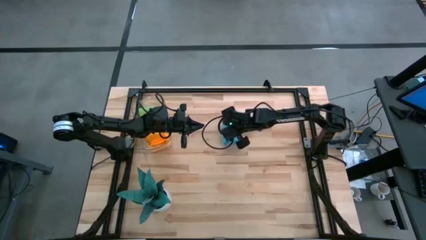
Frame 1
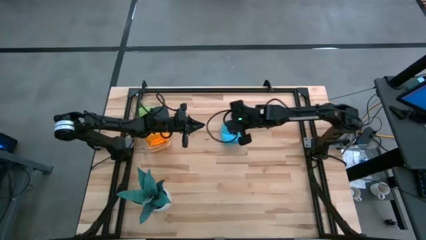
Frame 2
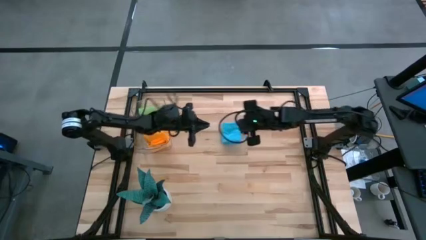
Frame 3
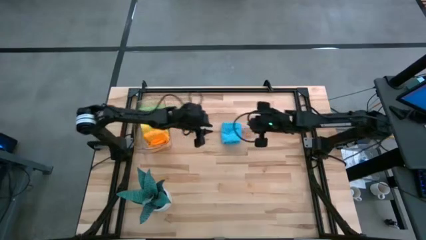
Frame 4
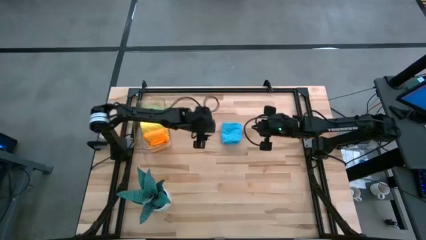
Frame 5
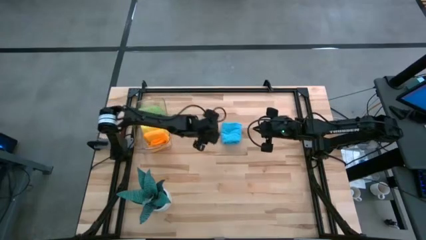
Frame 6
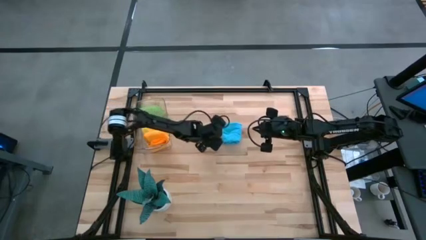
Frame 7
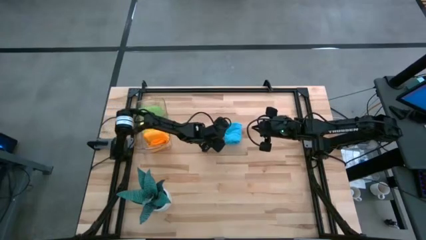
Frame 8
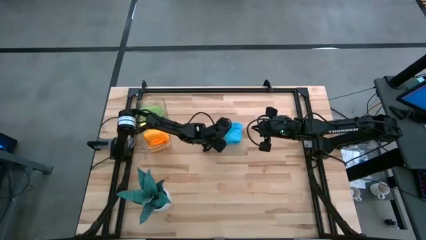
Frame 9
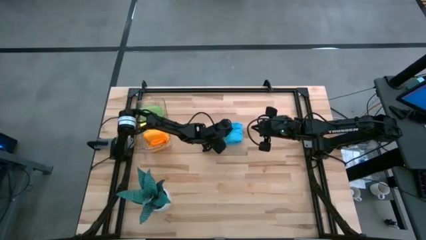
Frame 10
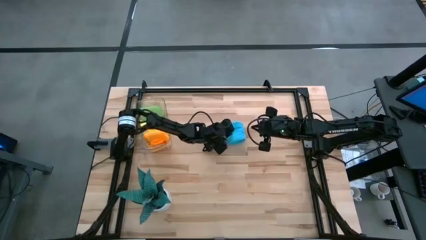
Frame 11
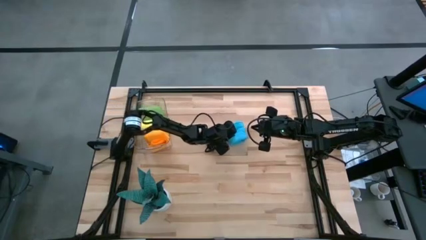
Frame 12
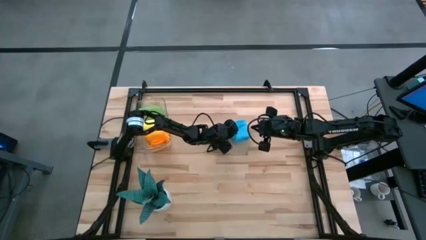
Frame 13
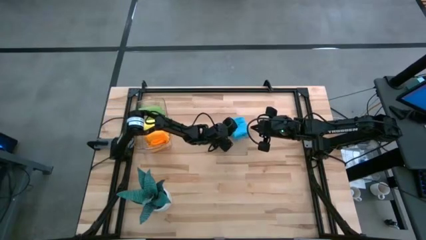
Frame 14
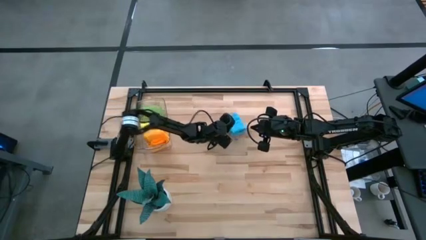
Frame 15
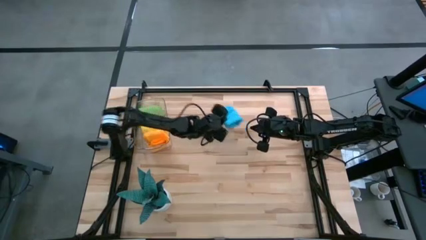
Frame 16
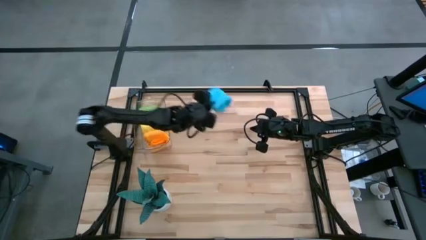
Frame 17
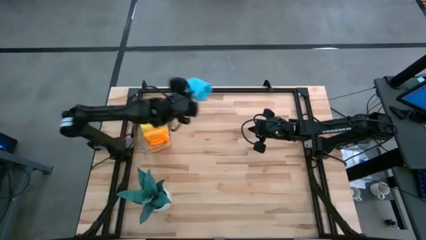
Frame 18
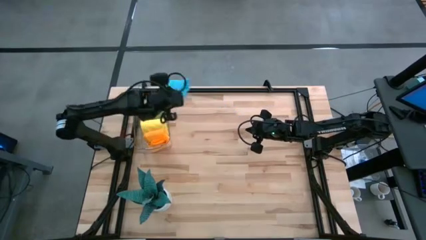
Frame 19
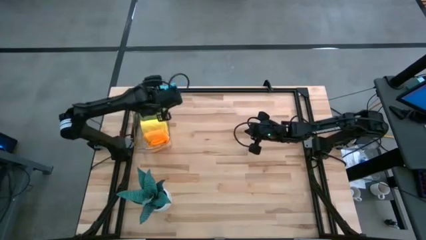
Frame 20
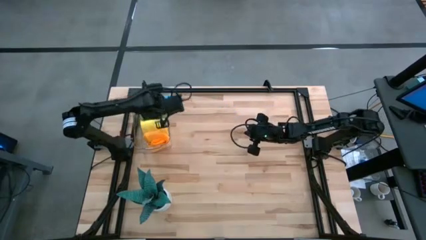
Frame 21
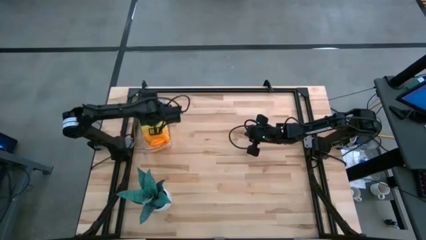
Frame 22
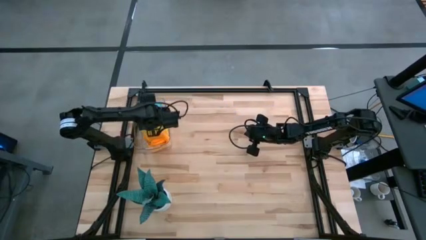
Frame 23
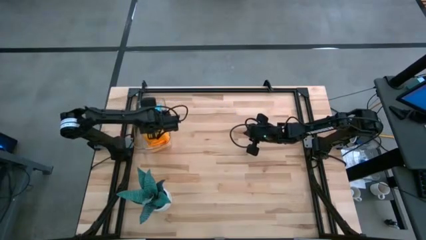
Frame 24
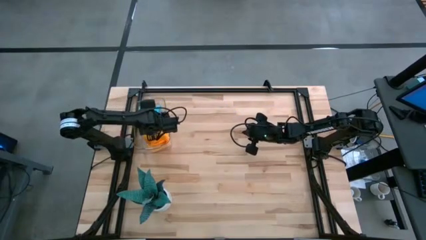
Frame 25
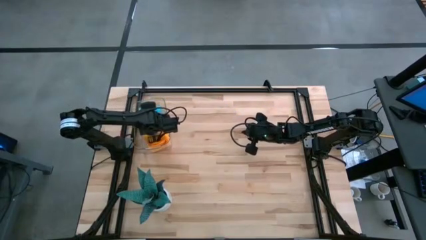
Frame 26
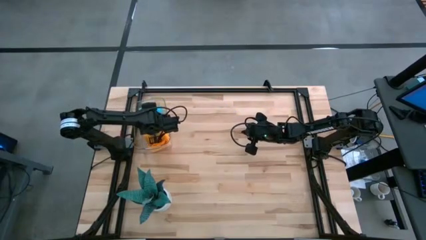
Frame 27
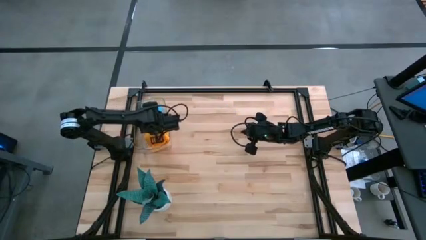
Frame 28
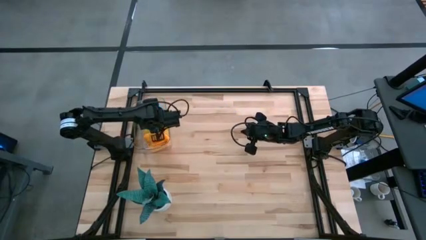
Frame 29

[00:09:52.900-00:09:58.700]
Task: Roll microfiber towels into tight, uniform cylinder then place into a basket
Put the rolled blue microfiber towel into the transparent bin

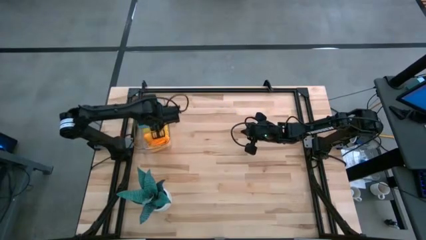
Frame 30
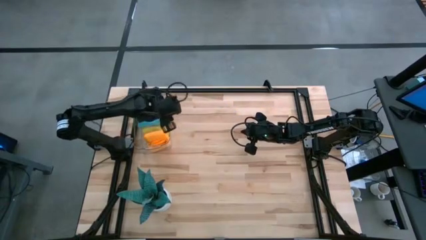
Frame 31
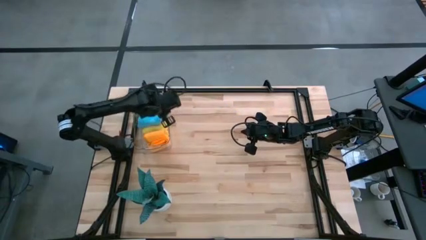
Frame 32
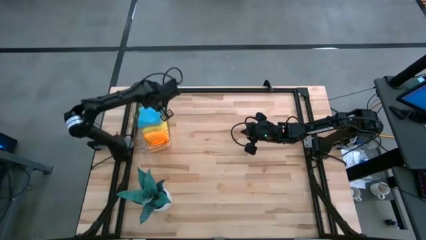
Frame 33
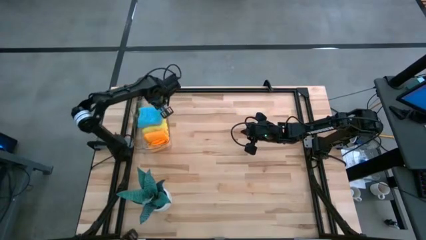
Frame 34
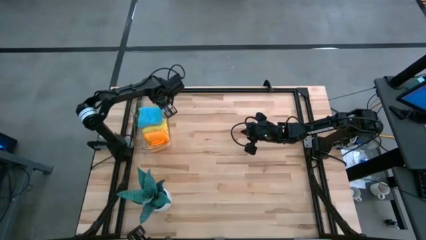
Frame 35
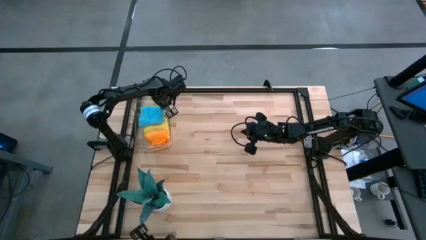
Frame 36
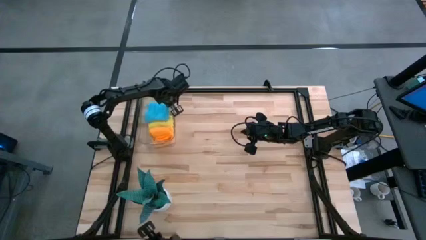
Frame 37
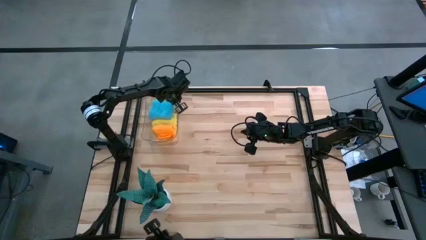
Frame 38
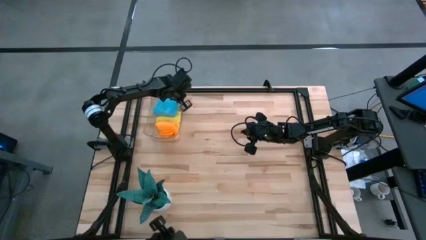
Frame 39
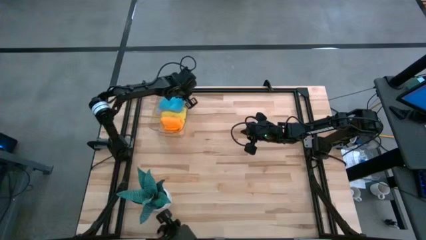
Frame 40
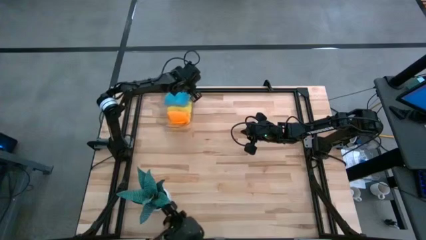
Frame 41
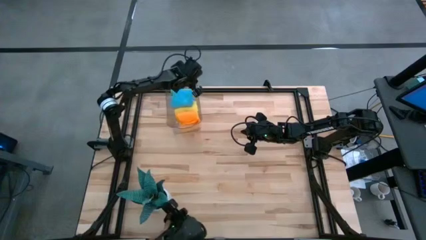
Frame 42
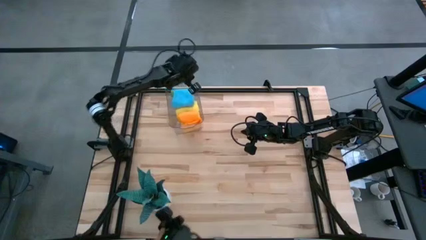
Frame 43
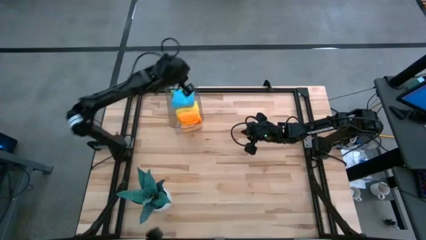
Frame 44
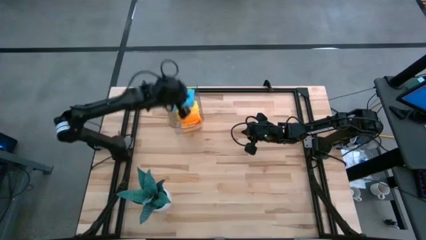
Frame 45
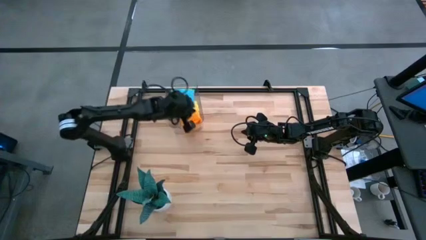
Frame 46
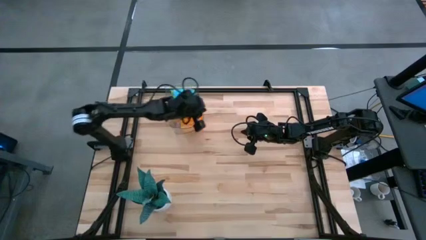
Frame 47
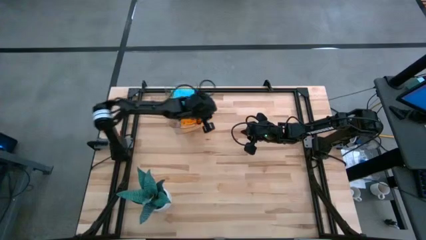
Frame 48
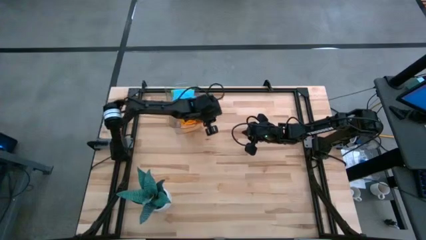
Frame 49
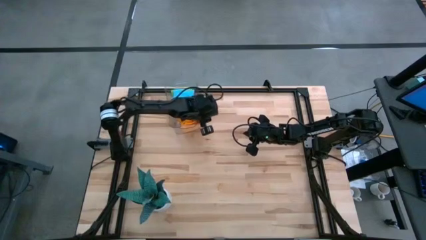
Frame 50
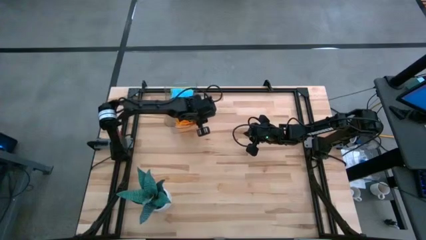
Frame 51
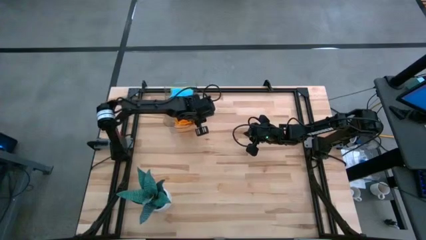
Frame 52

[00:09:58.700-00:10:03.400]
Move the transparent bin to the top left of the table

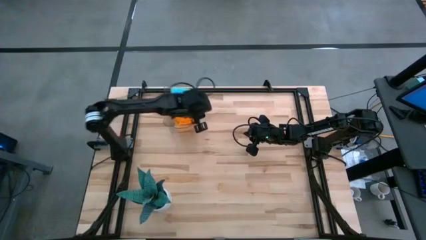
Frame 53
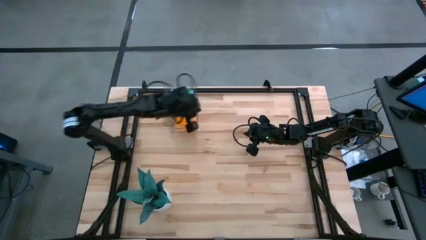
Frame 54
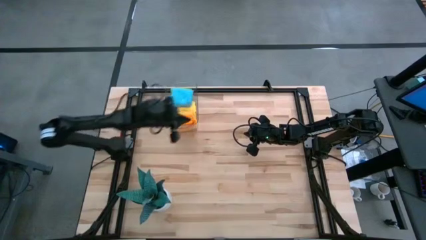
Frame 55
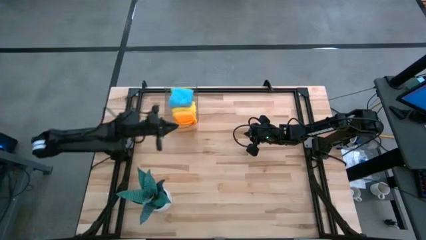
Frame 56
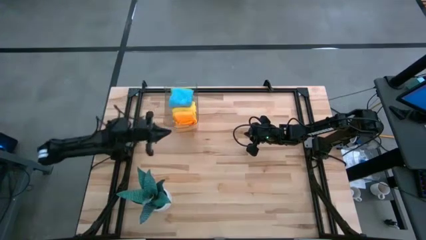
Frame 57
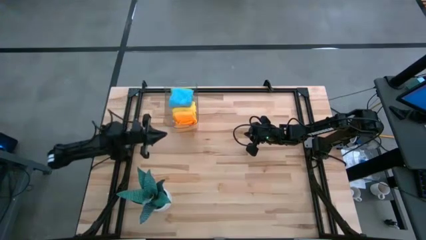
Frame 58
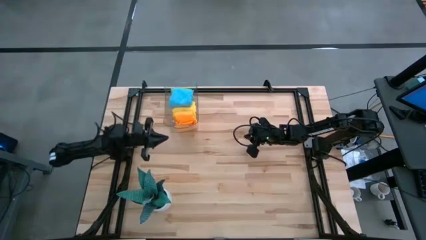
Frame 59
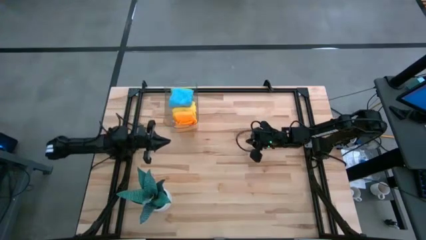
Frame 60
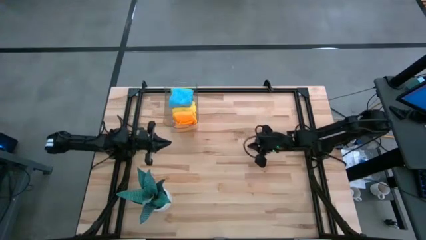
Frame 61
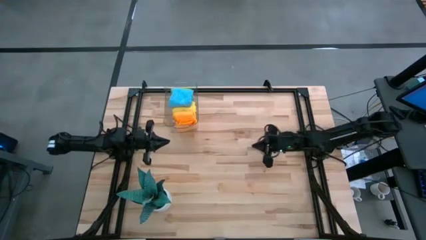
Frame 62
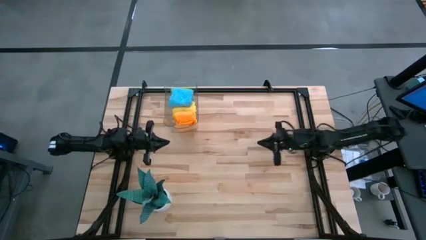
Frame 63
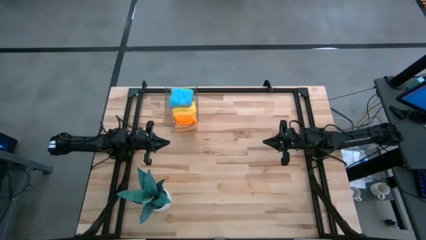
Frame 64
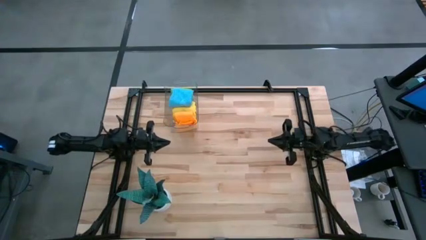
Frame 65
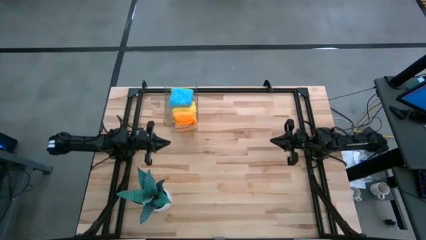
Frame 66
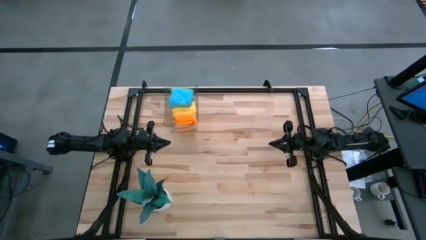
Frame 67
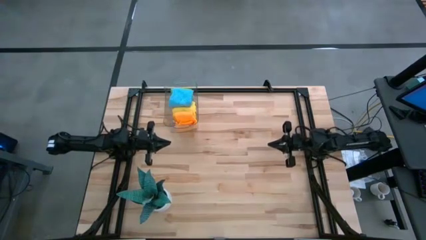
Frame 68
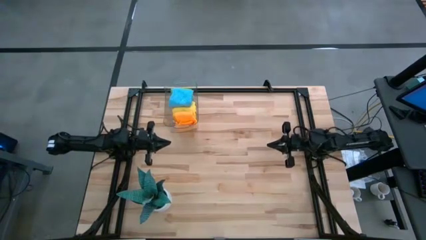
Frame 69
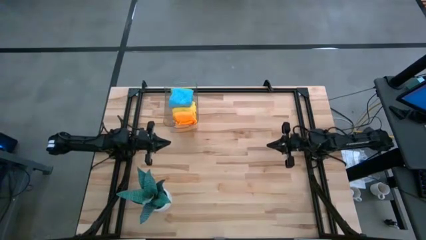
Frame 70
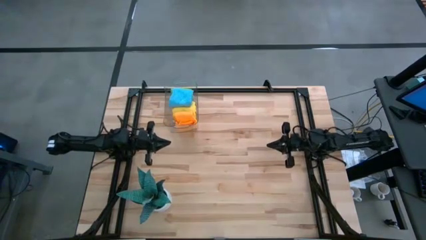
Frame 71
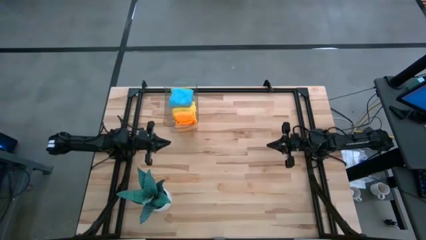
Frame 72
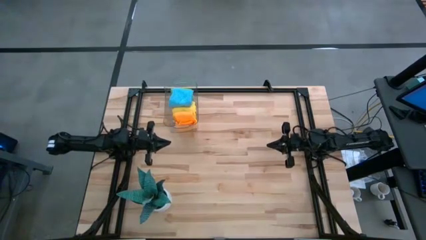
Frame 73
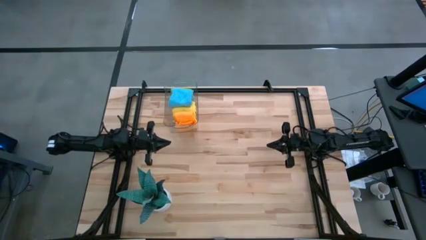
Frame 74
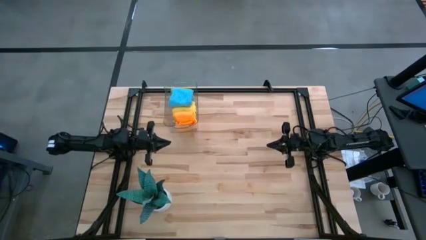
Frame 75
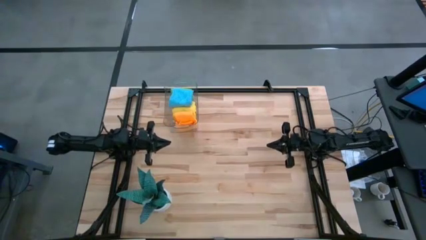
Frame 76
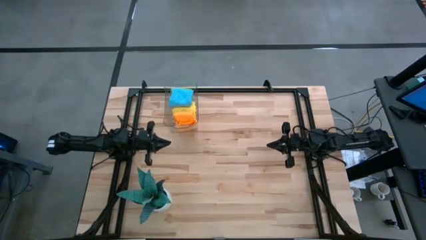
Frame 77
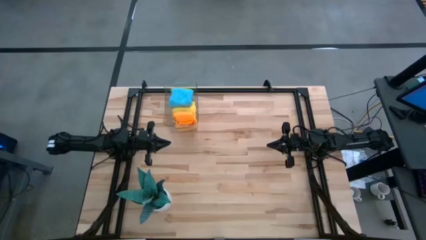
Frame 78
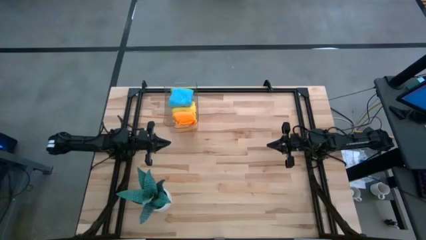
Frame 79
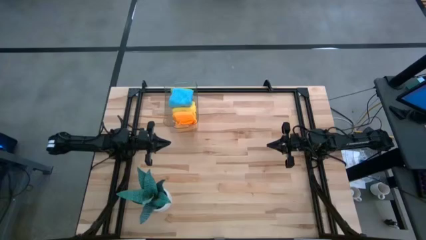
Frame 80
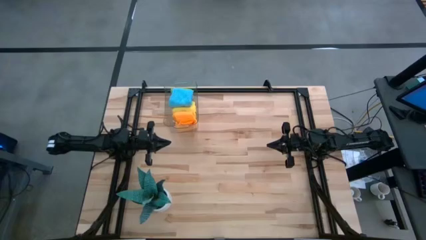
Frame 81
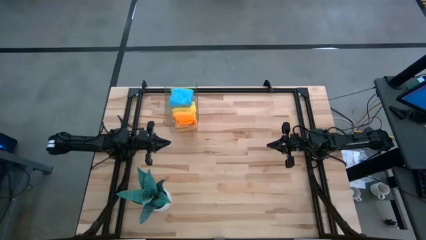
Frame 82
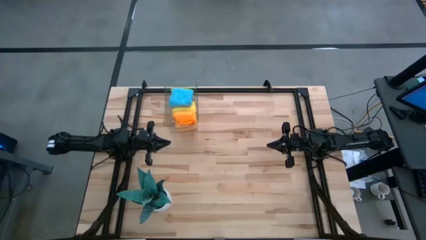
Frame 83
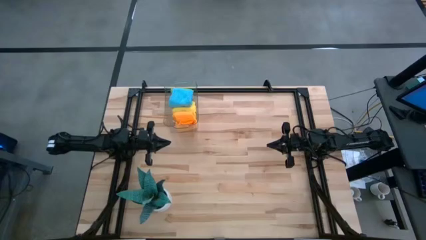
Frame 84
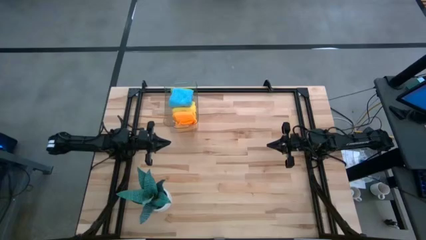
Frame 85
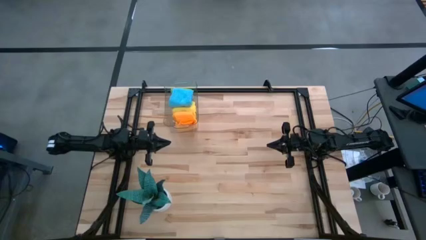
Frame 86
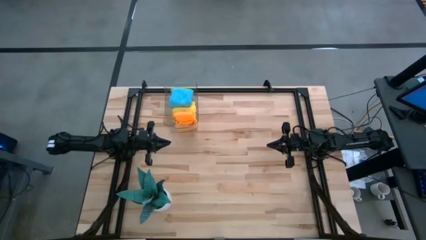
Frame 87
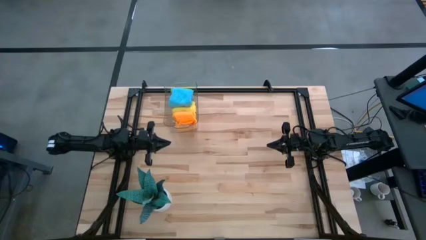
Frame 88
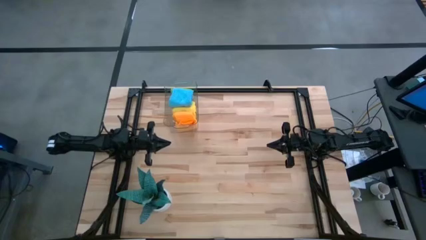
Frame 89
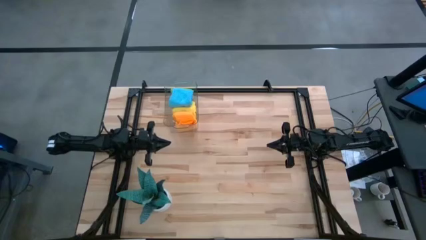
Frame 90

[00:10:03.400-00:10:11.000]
Return to Home Position
